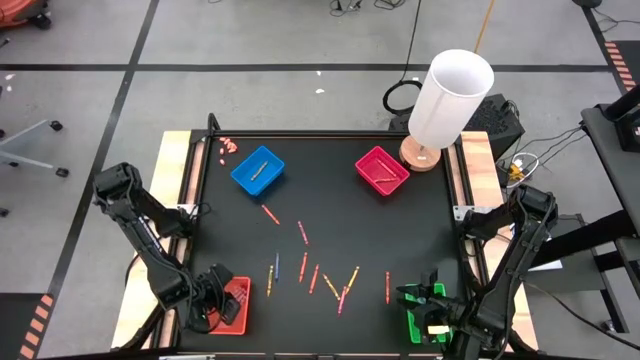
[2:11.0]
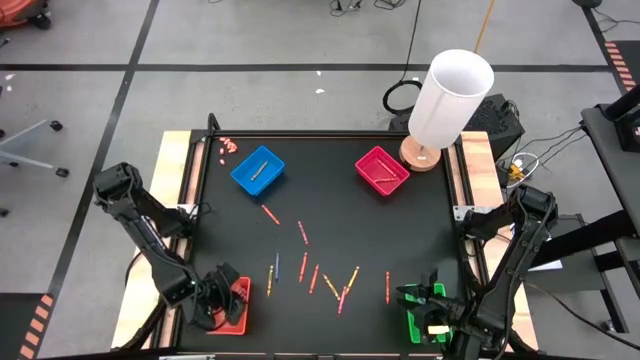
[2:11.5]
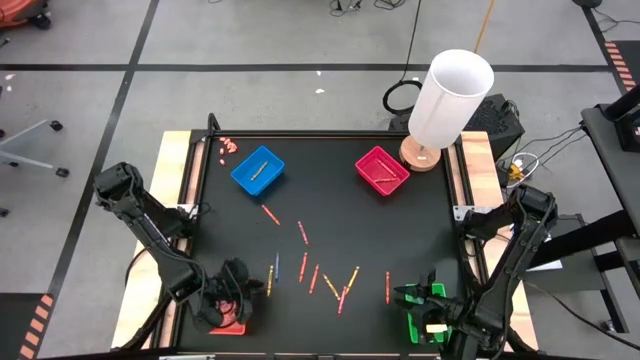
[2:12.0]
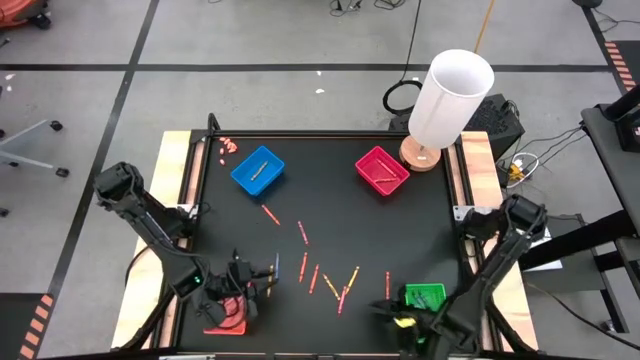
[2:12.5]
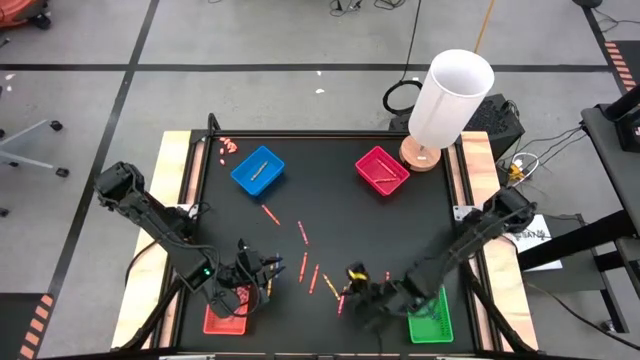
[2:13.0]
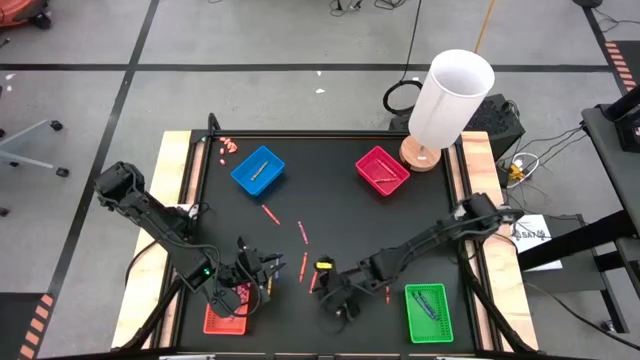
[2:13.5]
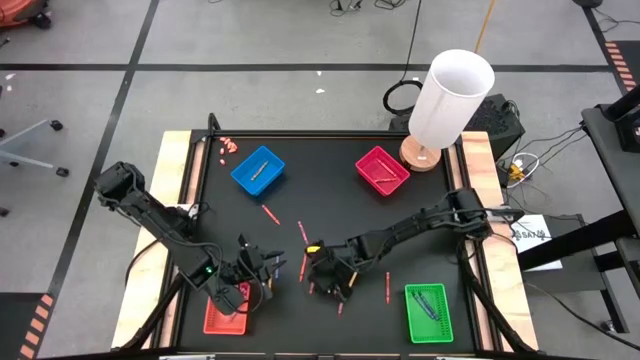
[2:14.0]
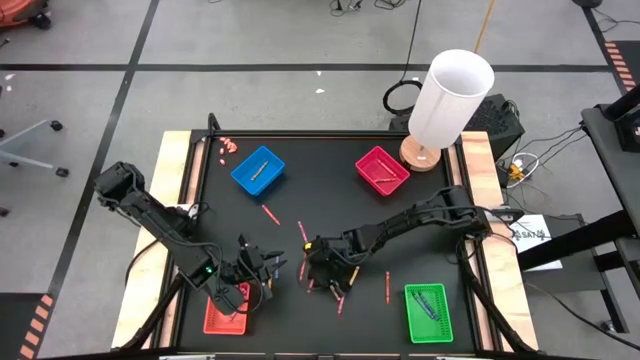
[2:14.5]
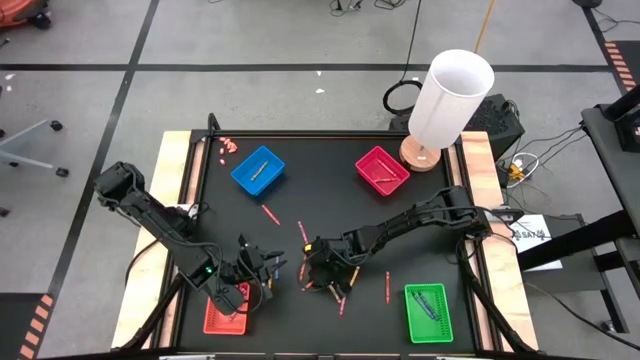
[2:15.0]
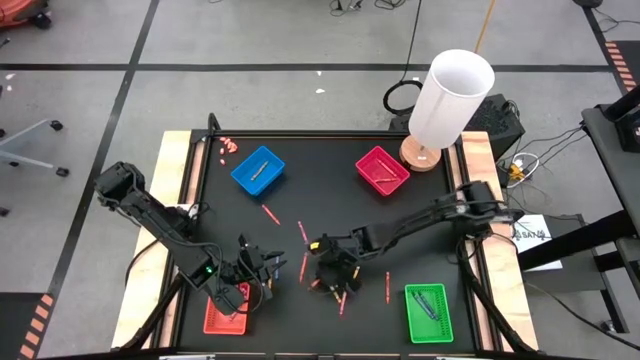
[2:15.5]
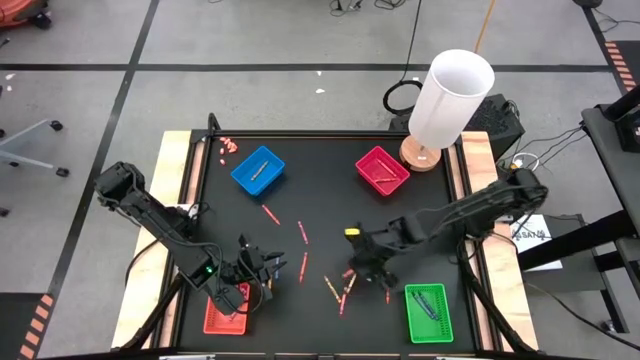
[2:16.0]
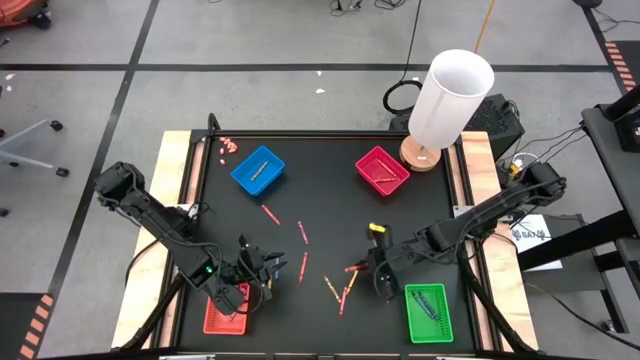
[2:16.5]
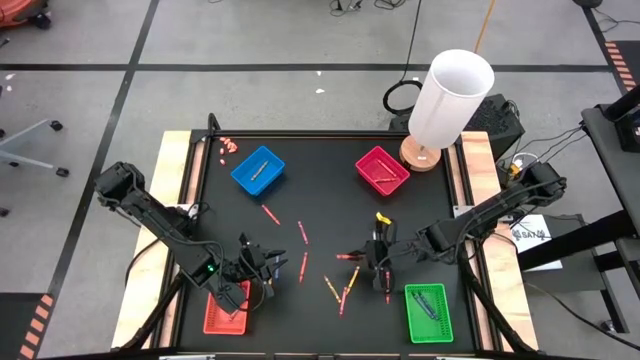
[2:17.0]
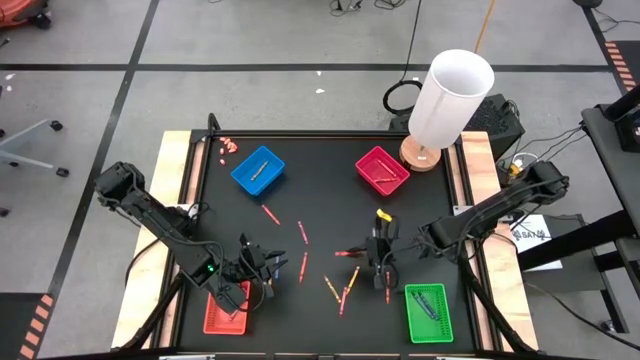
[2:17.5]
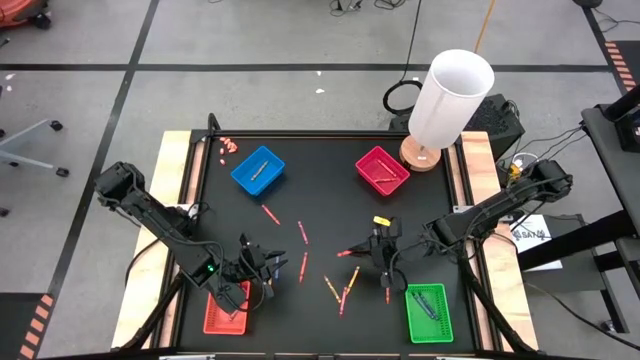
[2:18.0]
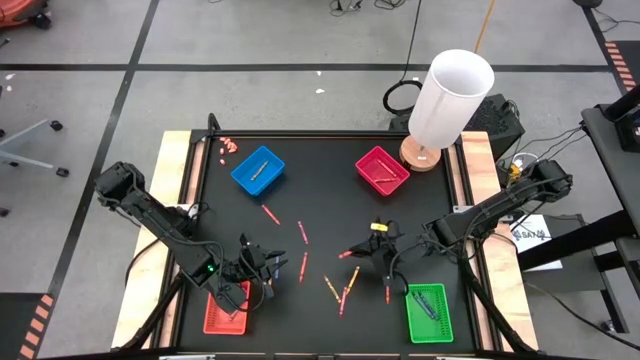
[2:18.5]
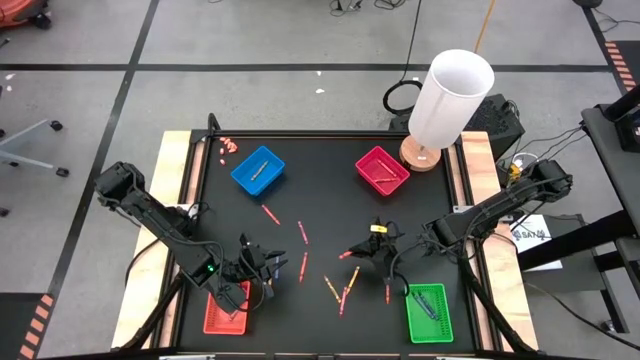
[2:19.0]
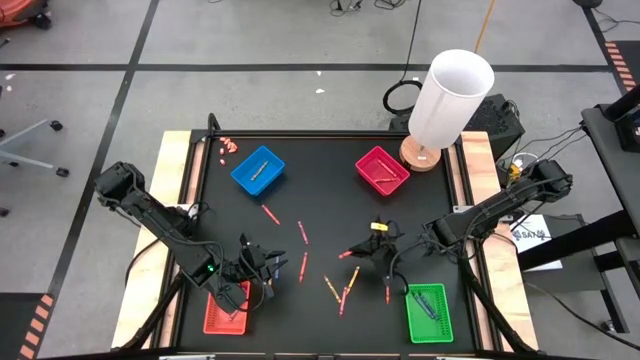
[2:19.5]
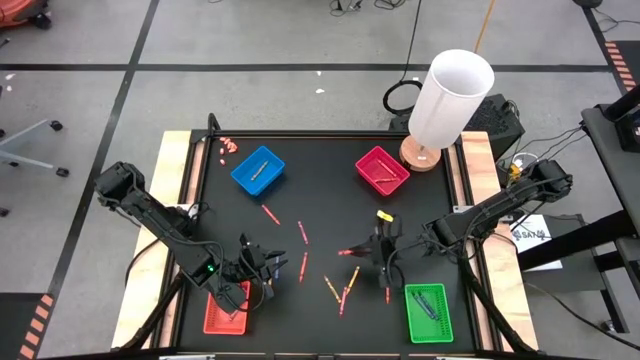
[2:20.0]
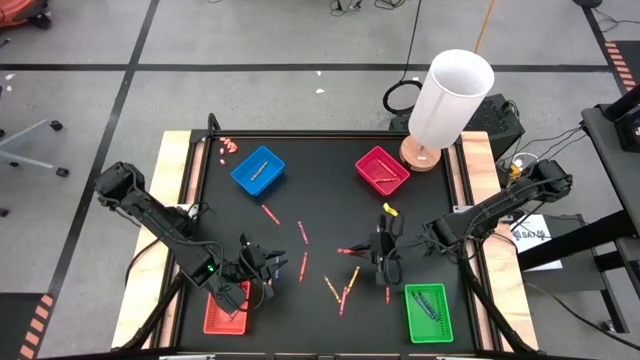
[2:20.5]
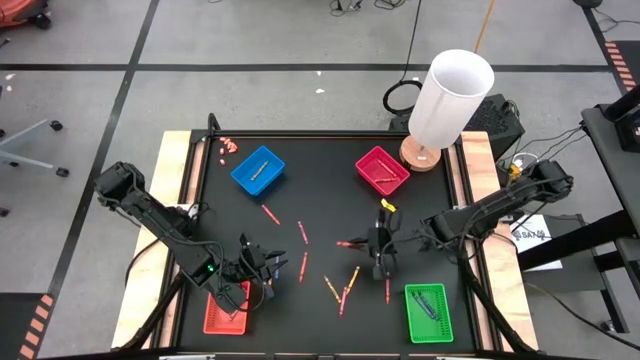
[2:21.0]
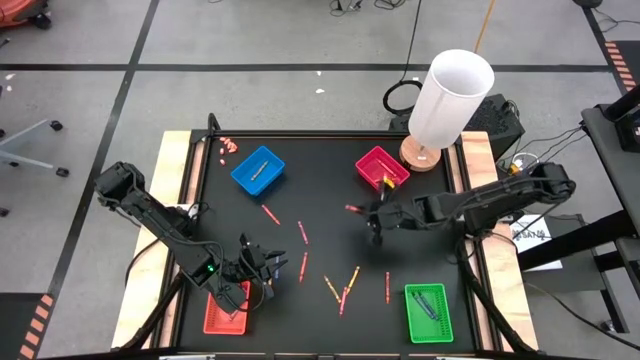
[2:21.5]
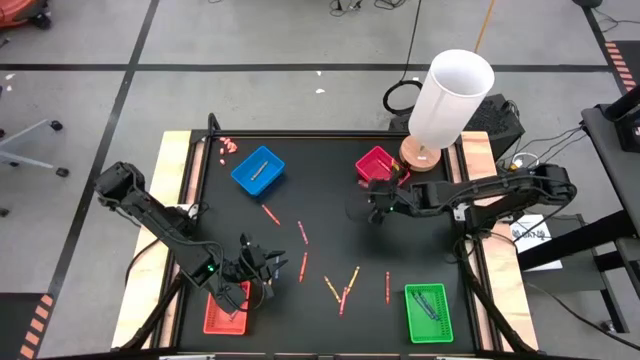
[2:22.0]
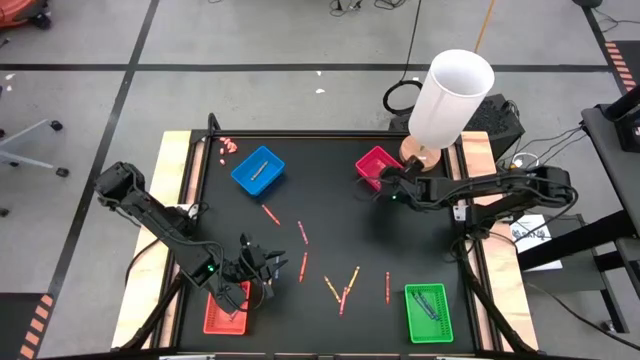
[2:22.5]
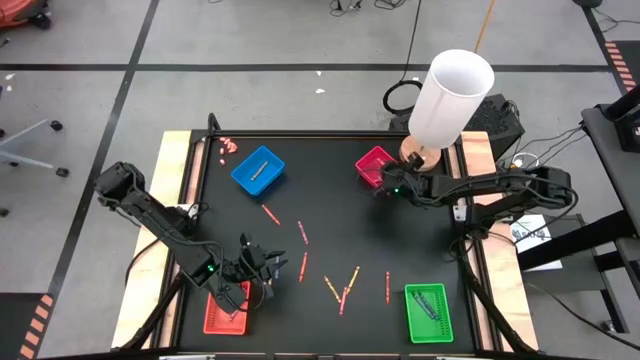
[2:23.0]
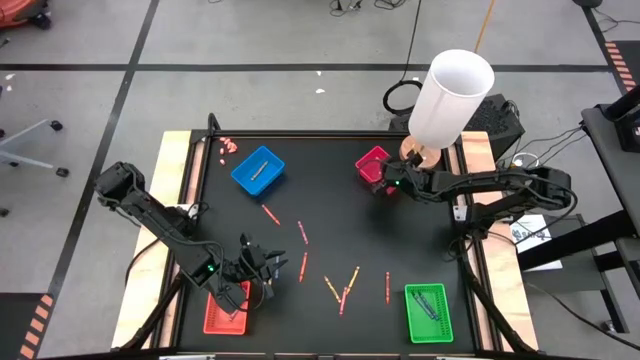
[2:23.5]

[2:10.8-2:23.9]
Task: Sort crayons
Put the orange crayon into the red bin

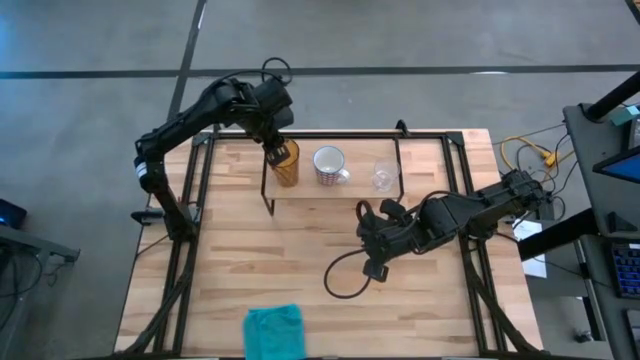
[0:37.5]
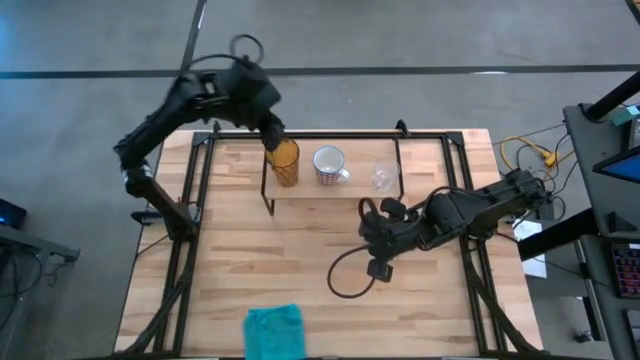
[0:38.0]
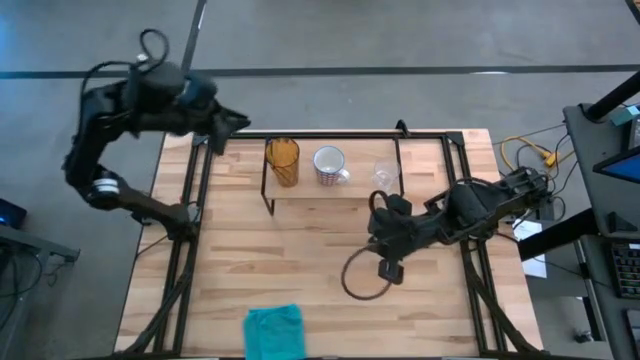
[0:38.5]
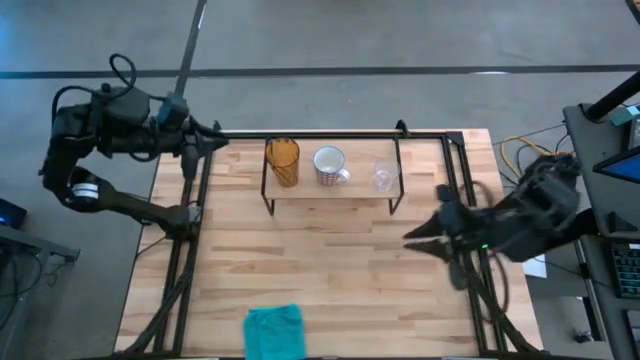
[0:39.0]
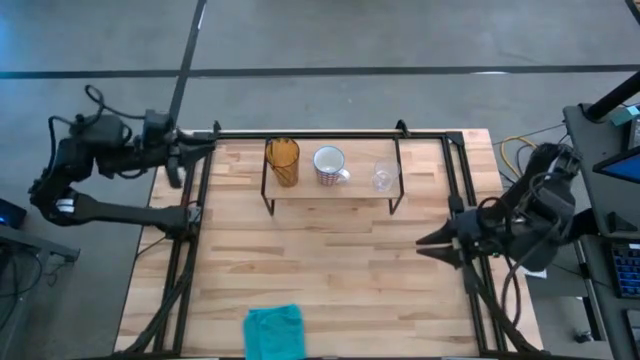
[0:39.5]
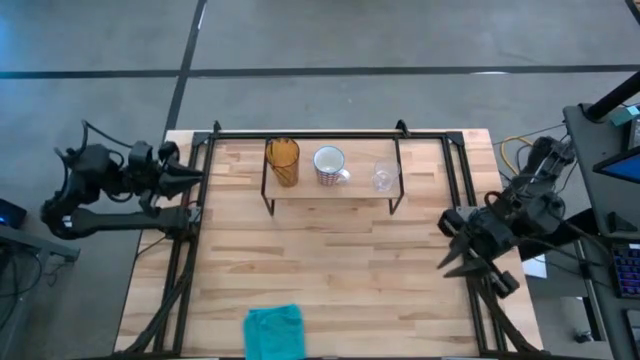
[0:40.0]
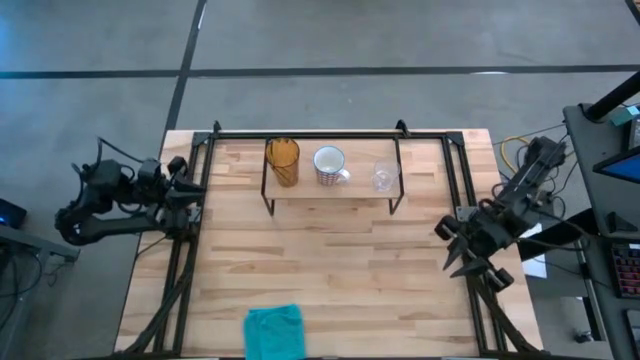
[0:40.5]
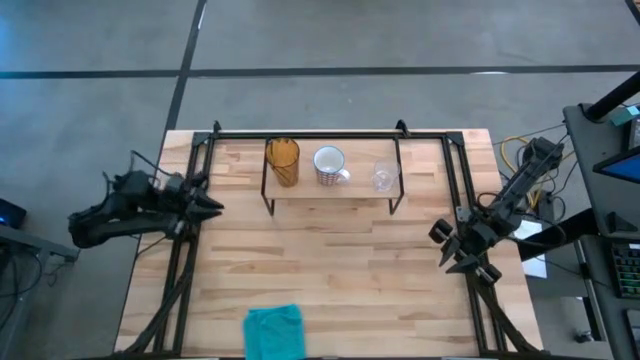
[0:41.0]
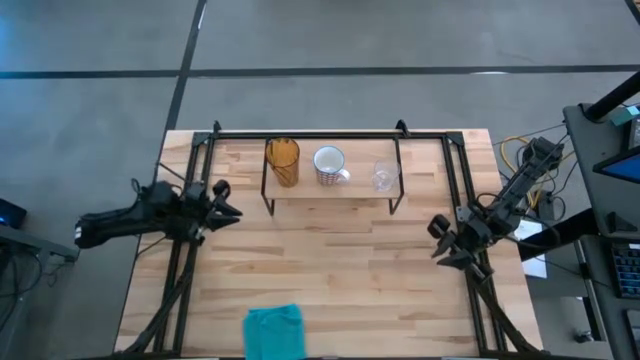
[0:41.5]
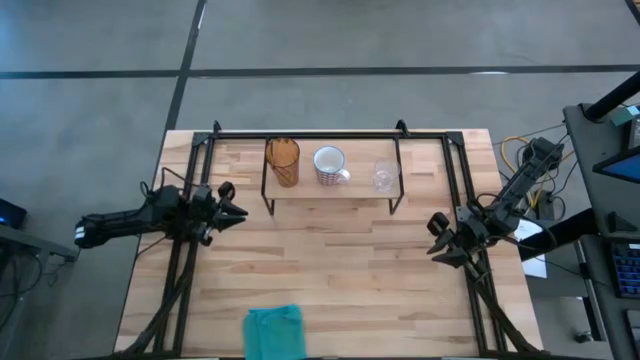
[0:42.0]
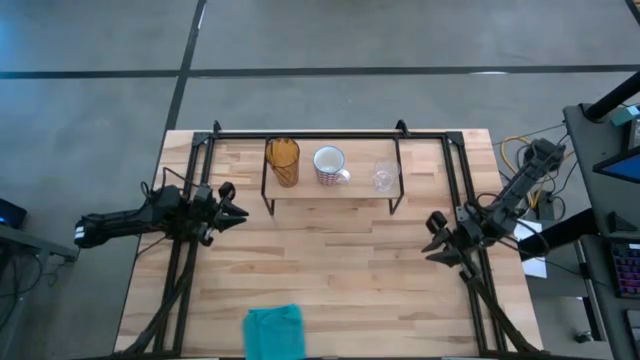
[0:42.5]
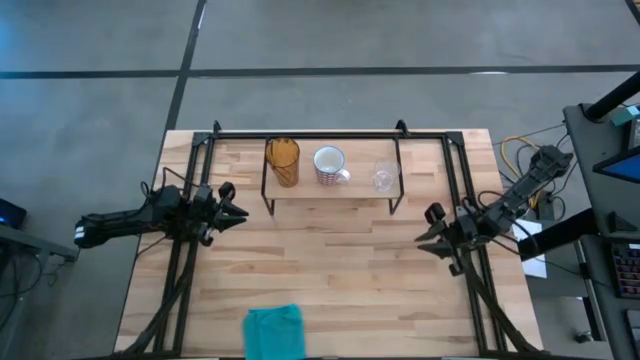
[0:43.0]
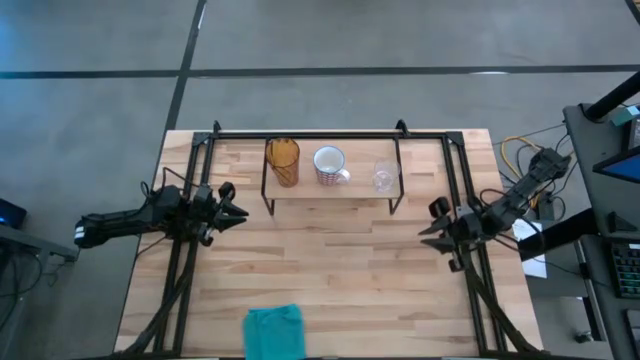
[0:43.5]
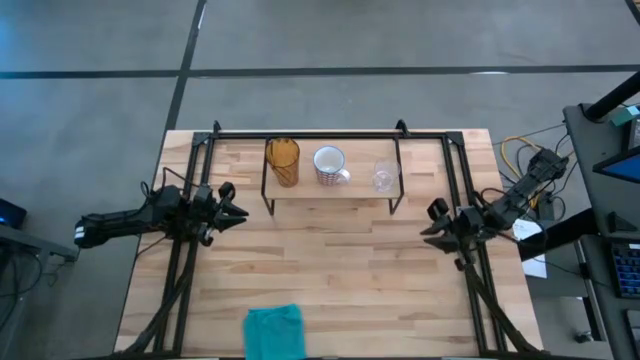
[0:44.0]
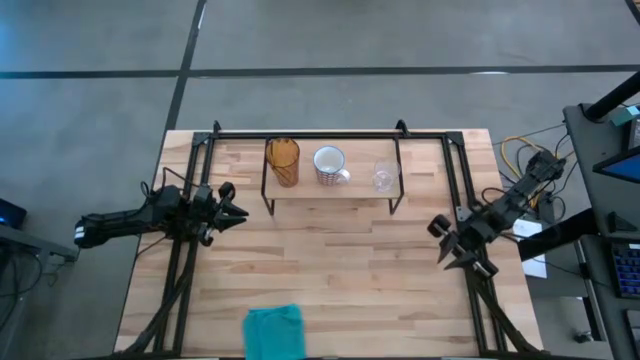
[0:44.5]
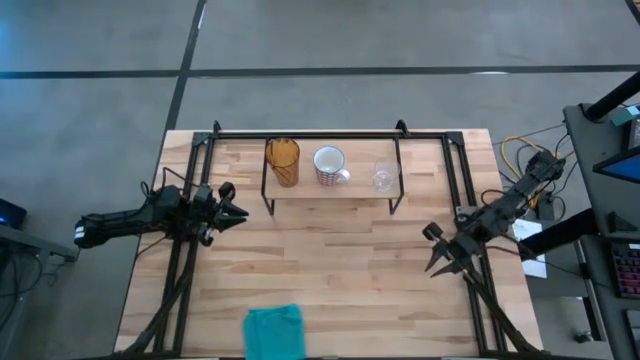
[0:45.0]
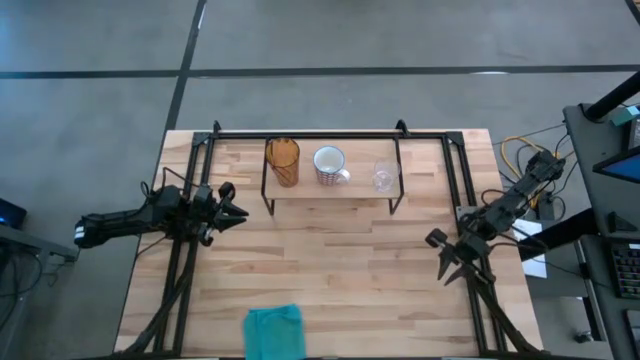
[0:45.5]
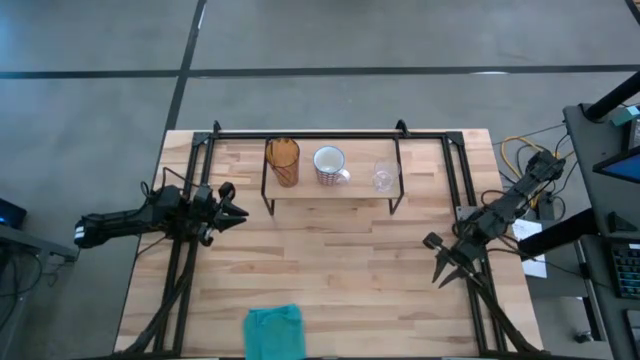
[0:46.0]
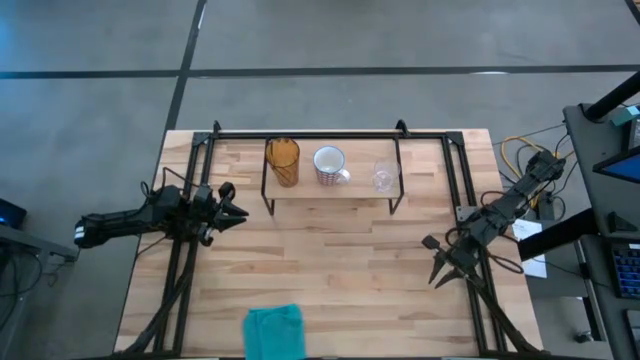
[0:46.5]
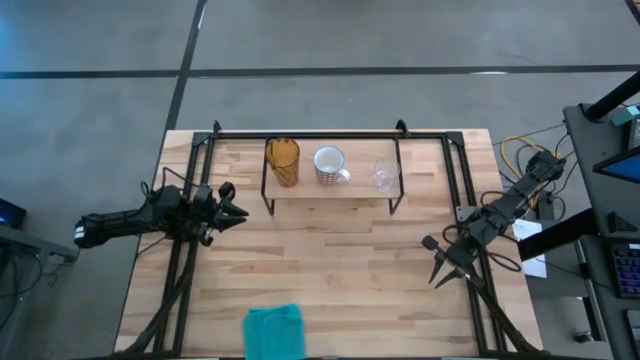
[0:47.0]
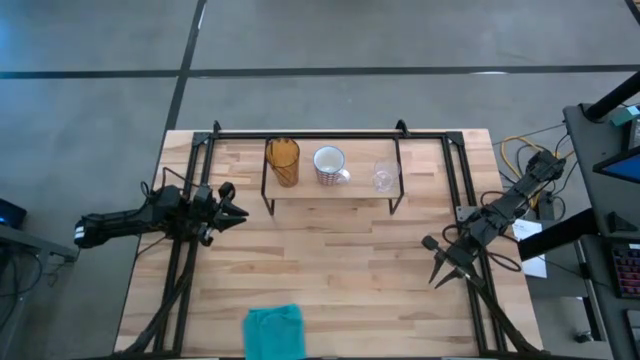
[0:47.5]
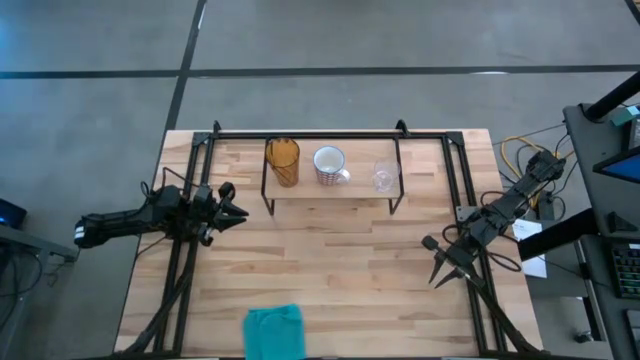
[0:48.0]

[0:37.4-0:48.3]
Task: Stack small to large cups/mugs on shelf
Return to Home position
